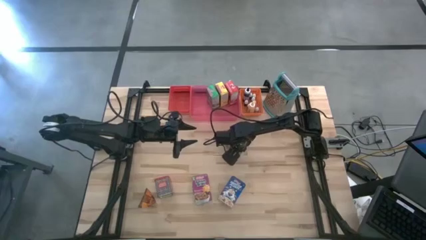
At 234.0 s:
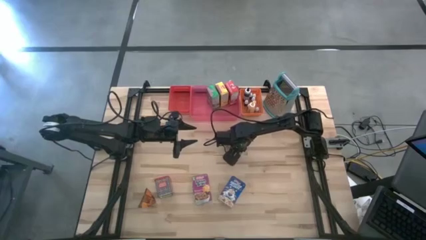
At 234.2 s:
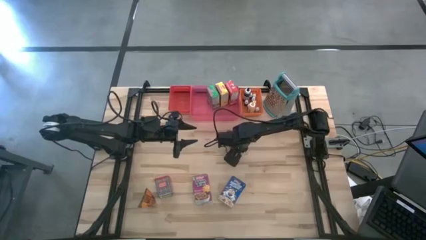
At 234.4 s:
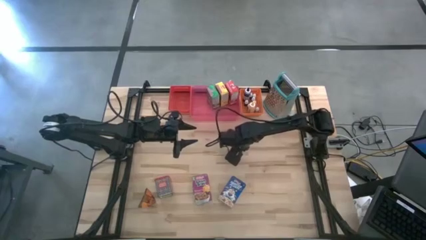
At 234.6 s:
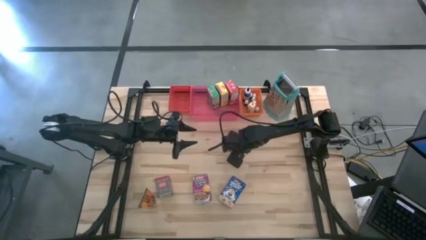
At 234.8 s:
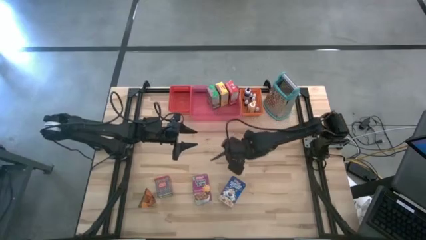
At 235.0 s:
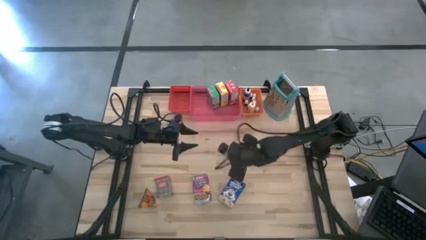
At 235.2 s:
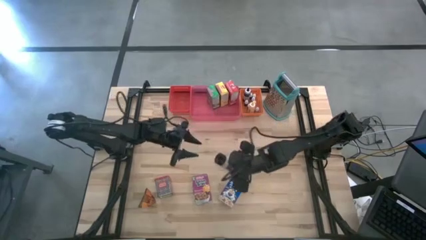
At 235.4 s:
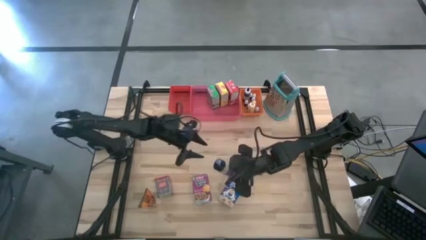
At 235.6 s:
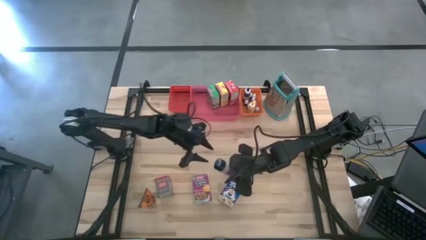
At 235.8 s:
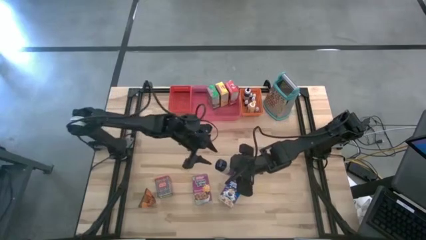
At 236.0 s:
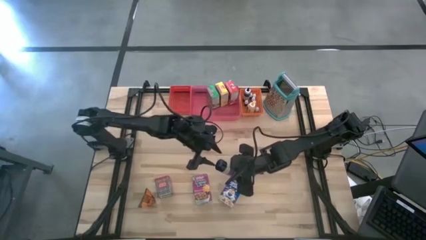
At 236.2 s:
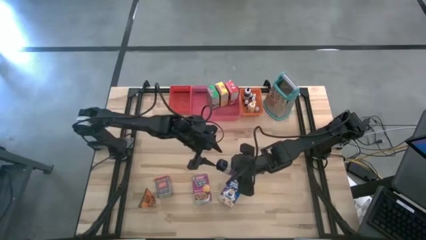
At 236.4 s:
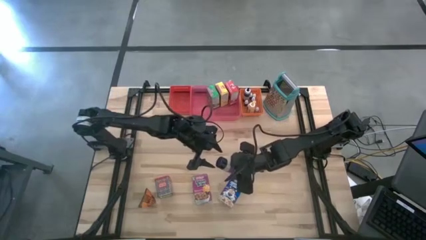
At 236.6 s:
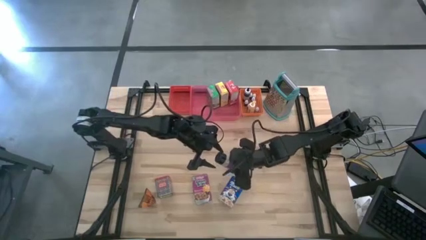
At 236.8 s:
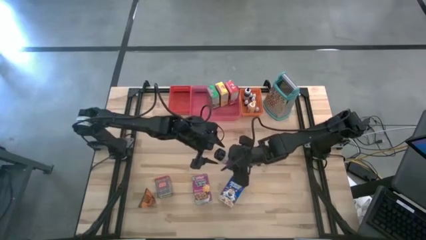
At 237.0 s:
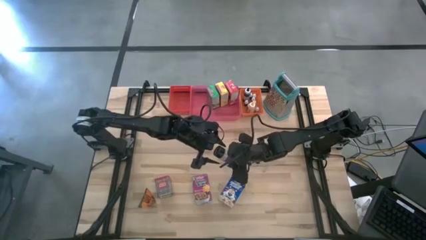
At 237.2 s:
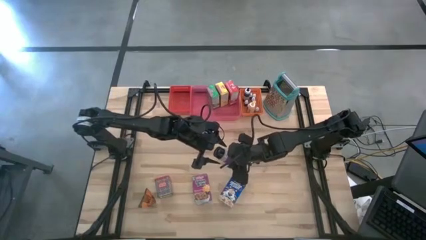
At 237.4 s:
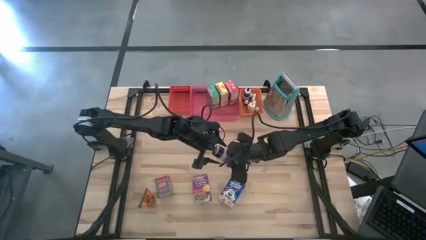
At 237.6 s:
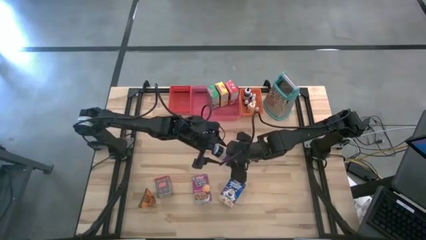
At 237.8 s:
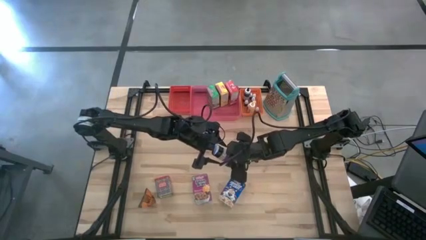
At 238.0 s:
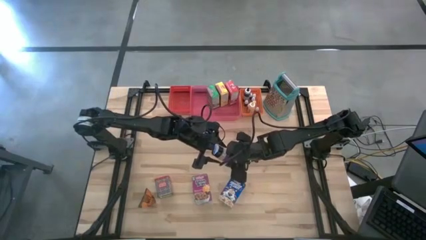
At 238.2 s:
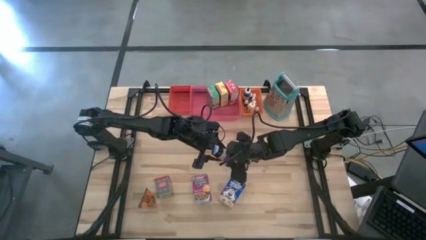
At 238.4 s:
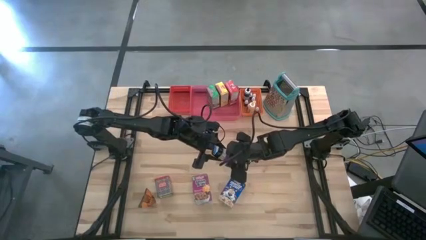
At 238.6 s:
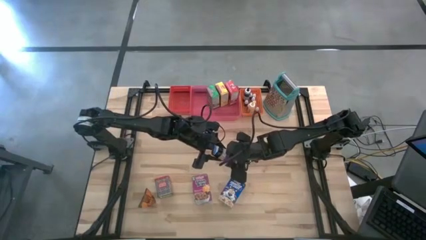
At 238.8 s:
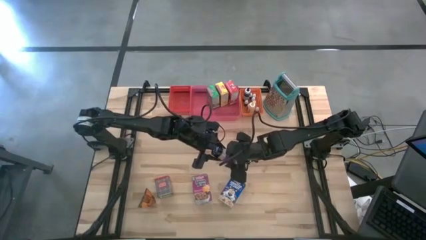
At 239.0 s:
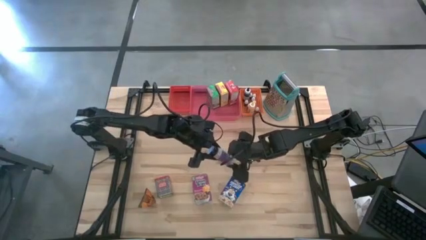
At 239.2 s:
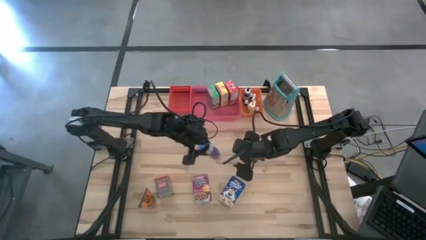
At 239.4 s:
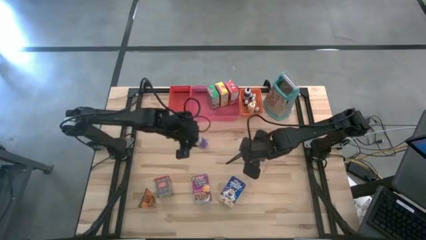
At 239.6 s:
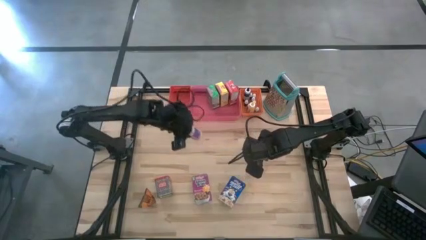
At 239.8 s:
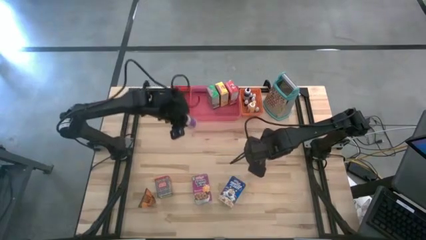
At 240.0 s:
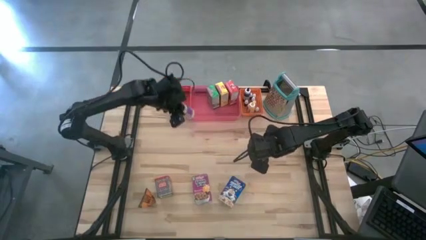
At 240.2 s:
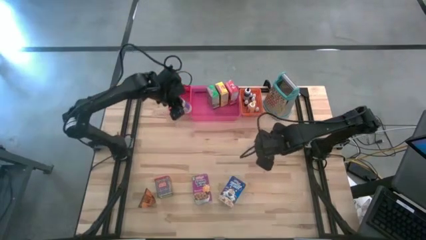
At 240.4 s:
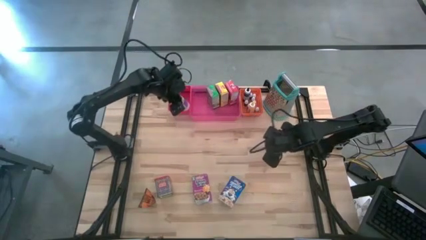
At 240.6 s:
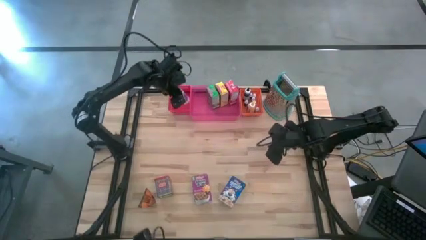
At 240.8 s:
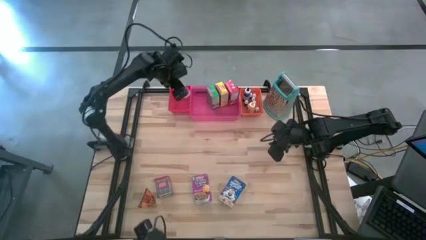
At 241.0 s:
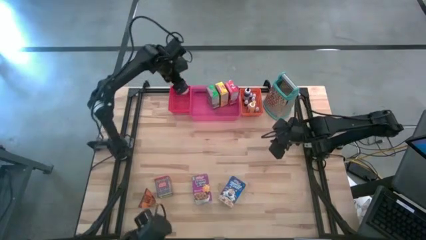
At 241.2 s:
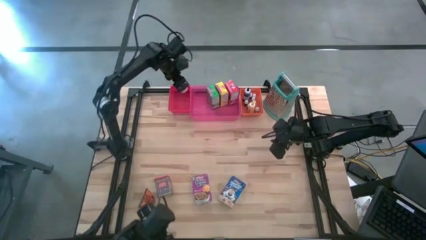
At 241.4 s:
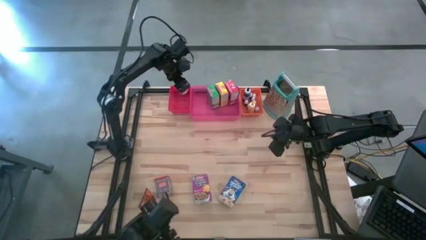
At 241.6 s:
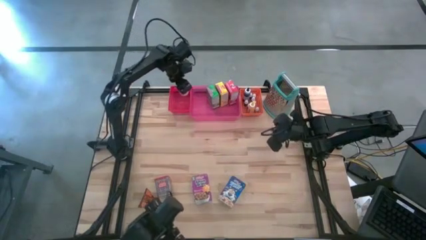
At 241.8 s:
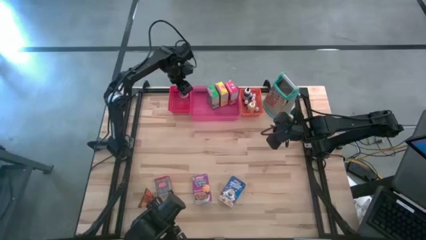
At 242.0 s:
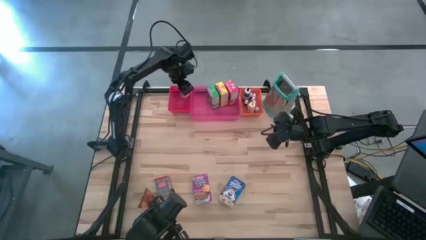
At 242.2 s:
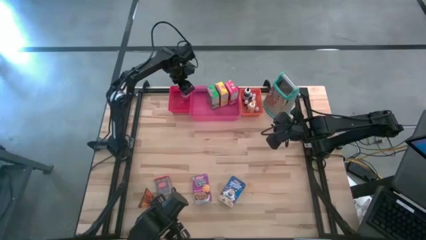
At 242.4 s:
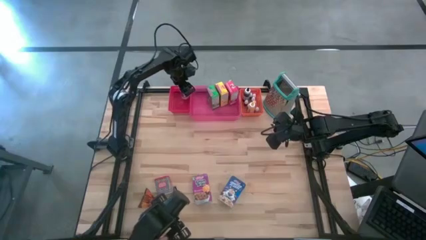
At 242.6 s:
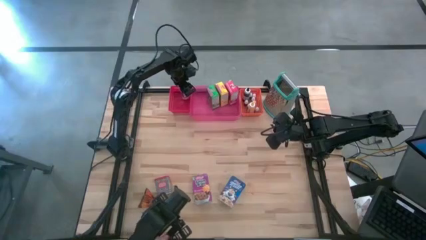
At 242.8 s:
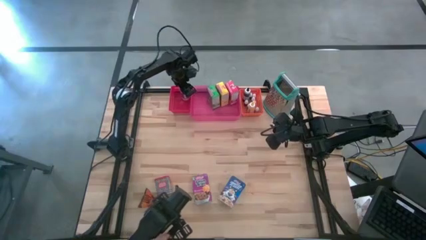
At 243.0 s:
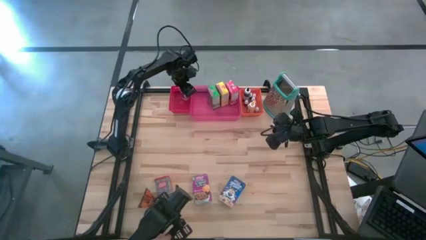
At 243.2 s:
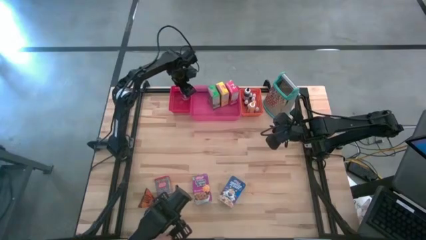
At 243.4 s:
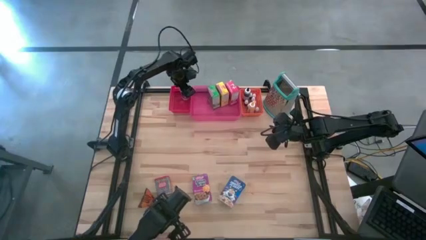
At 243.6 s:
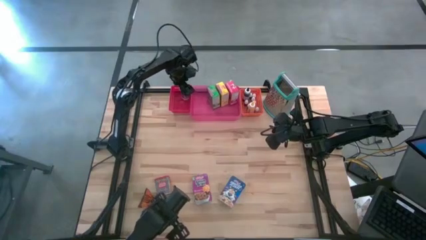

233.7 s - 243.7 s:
Task: Pick & Place Kitchen Items
Put the purple seasoning bottle into the red bin

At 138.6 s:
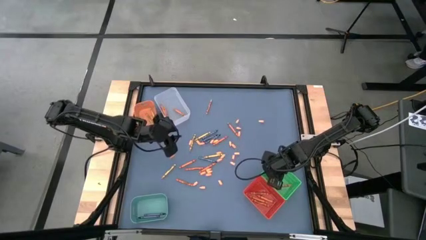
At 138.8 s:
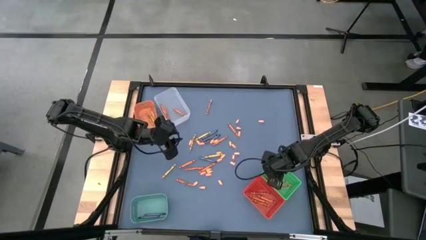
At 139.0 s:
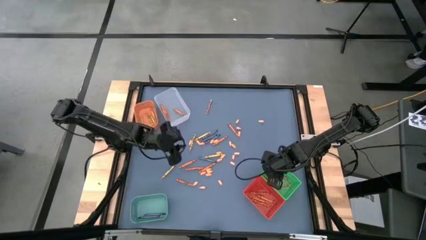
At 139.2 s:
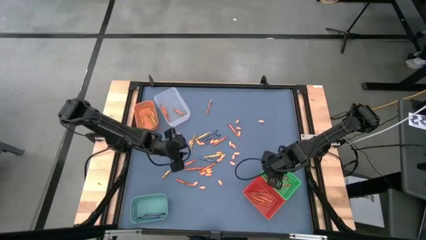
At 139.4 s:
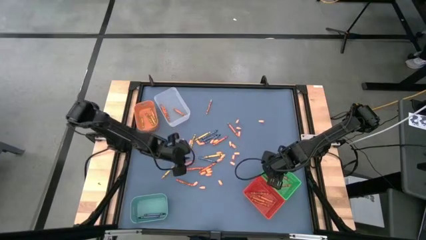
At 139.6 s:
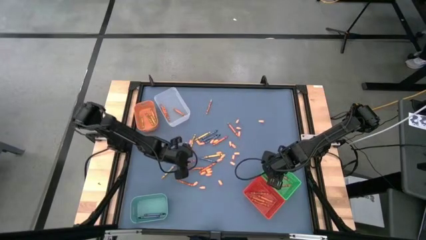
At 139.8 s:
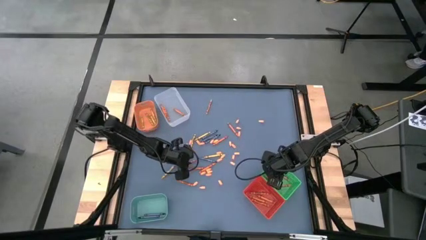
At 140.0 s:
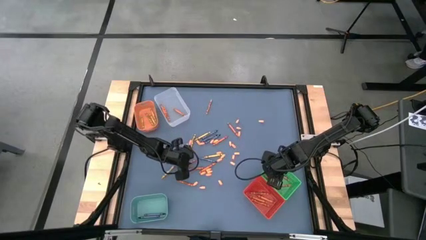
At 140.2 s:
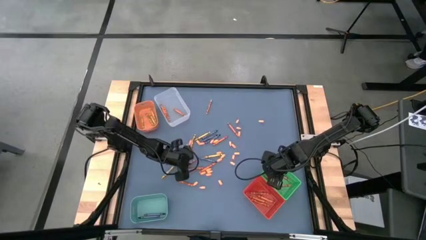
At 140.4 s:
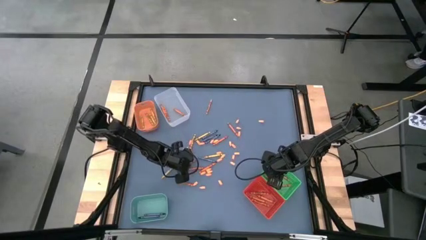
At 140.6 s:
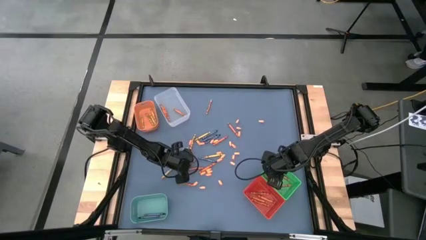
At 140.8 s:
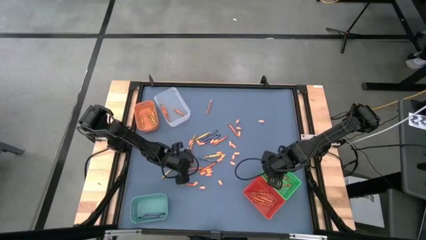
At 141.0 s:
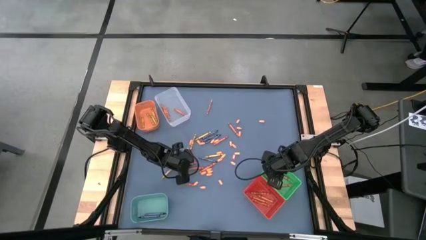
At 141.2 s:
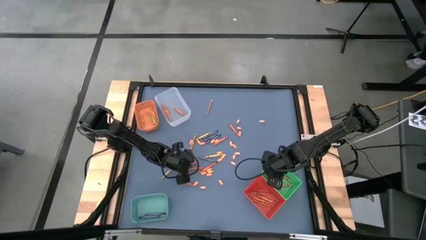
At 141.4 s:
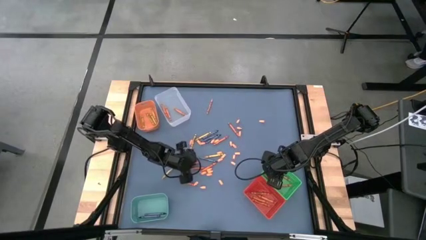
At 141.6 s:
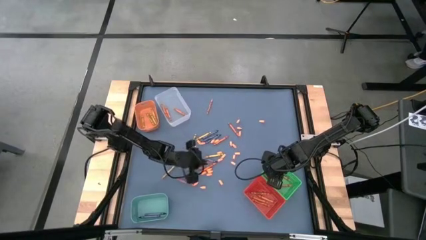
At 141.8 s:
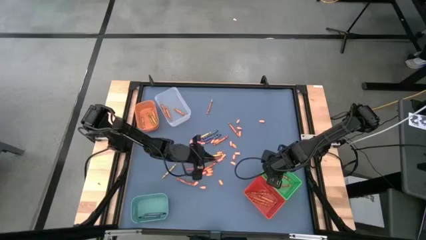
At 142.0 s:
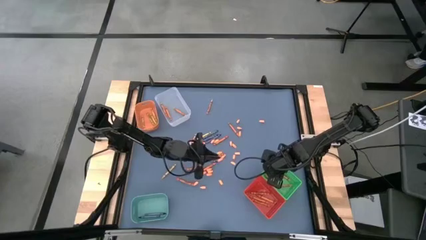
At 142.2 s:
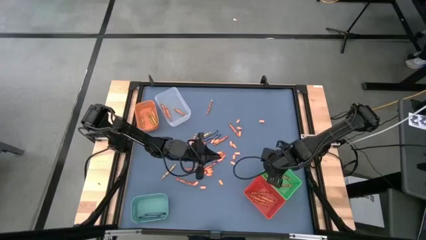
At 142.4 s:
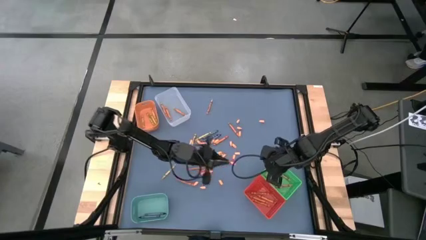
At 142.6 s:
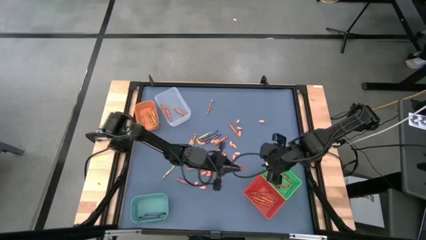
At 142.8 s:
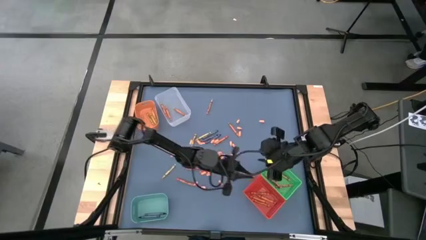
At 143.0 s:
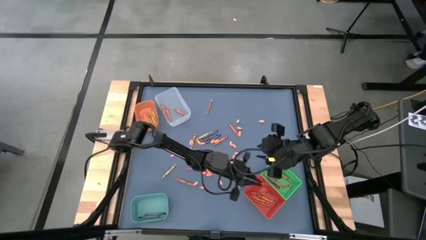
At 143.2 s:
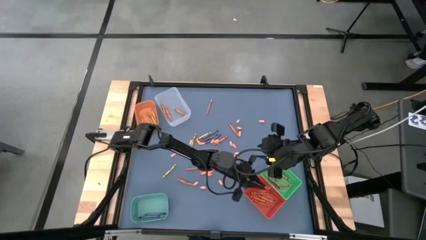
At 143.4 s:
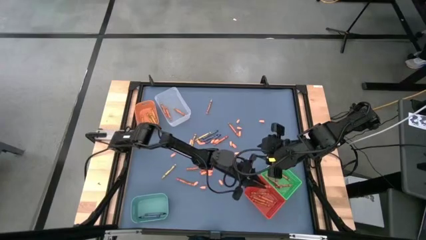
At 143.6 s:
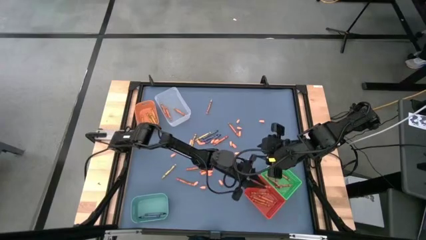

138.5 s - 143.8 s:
Task: Sort crayons
Put the red crayon into the red bin
